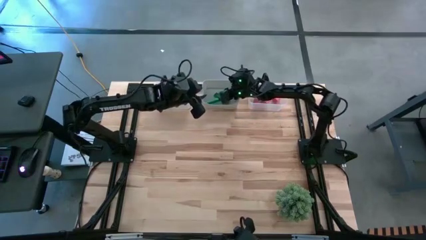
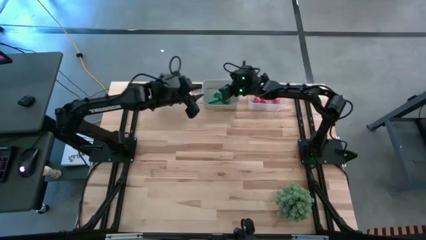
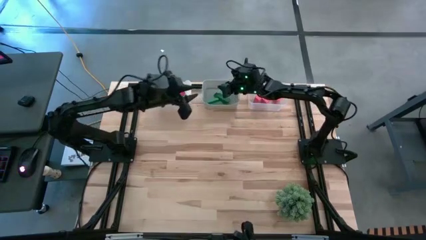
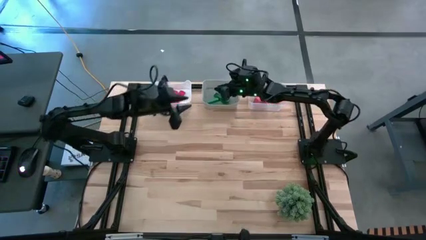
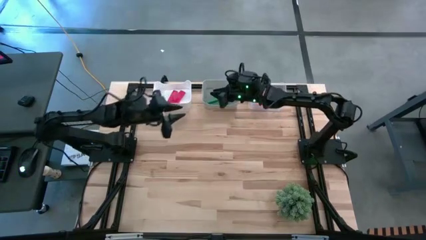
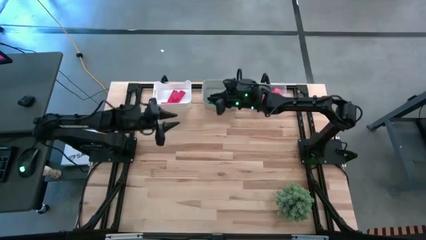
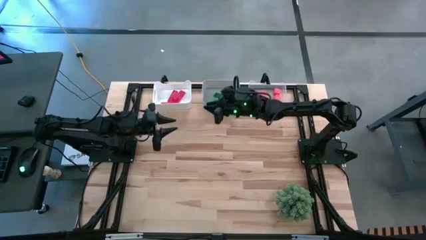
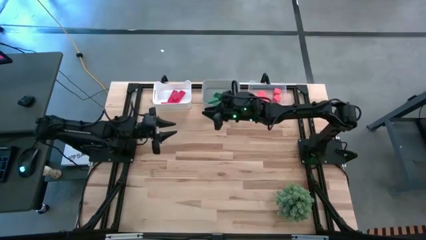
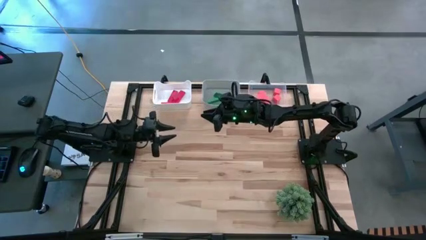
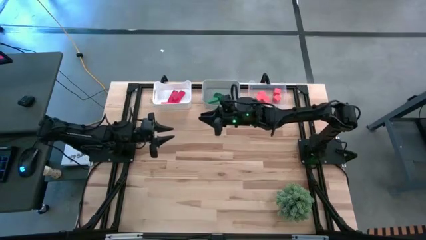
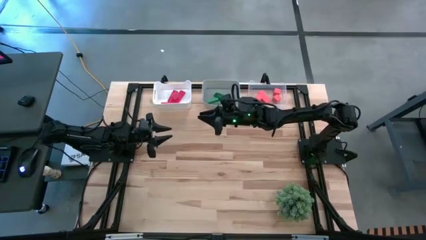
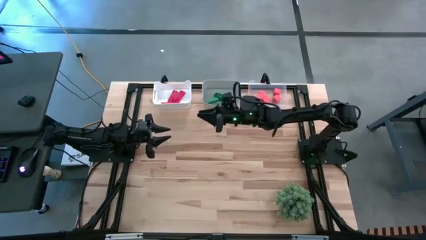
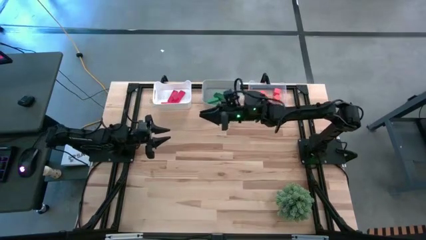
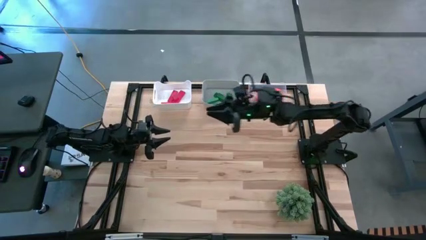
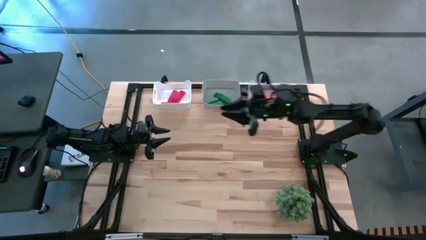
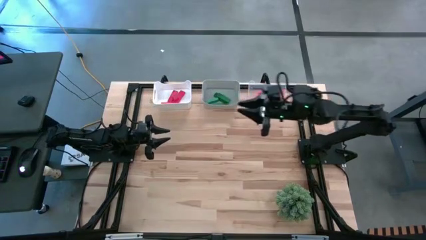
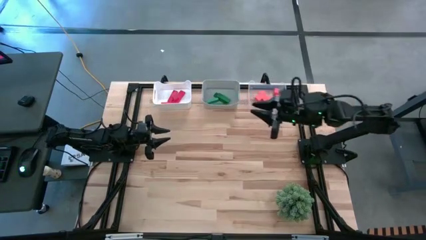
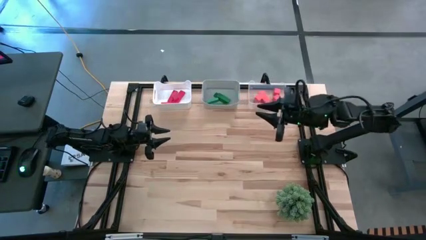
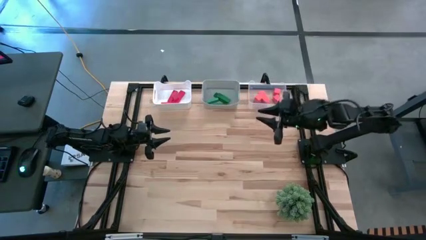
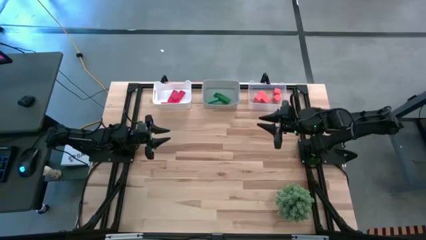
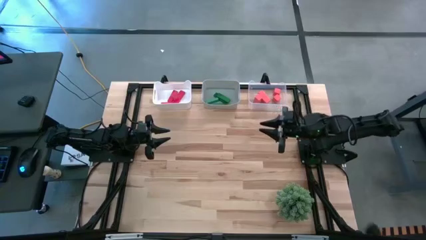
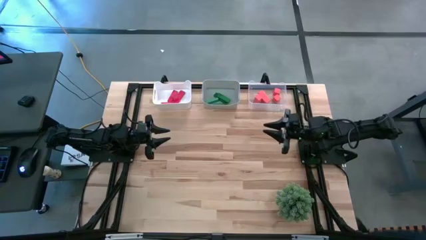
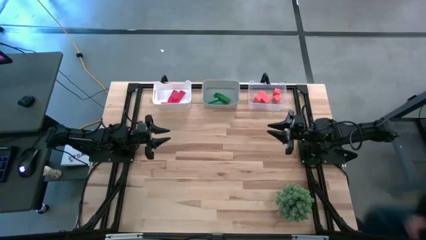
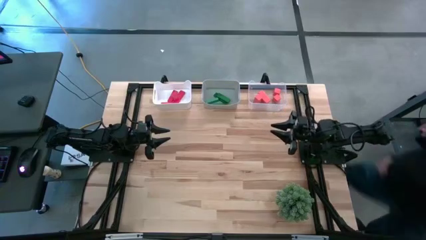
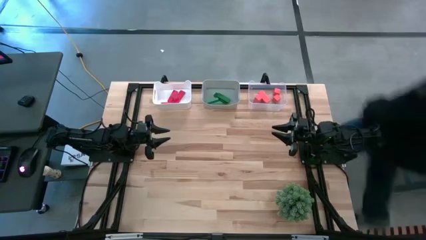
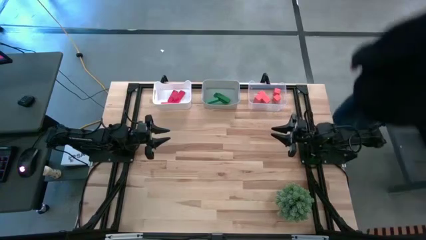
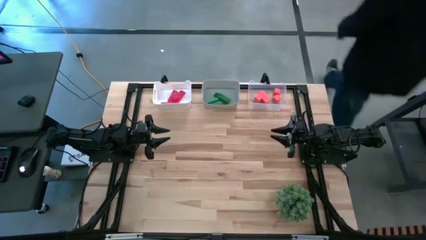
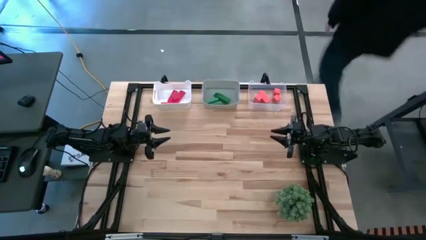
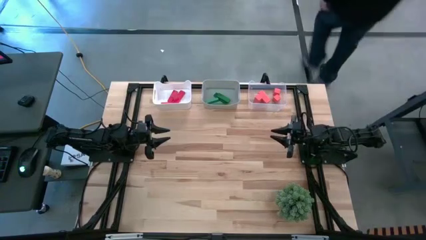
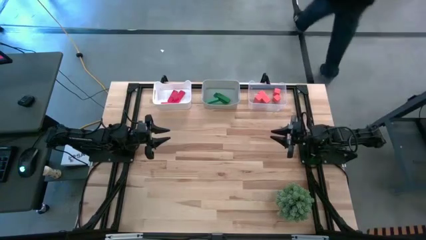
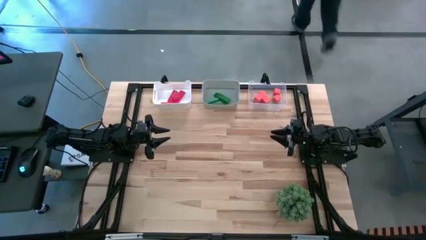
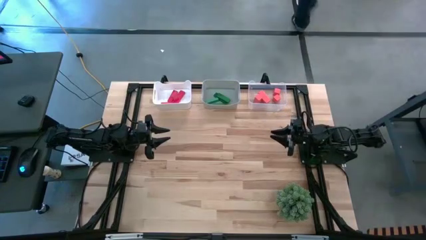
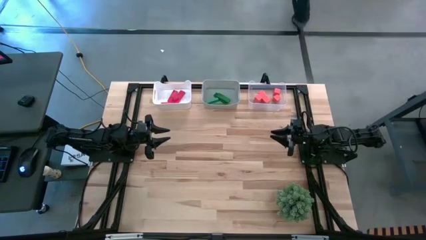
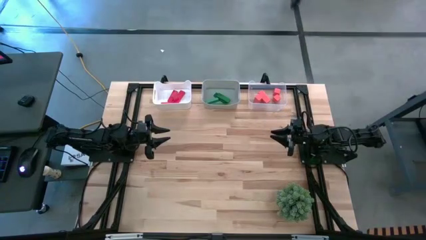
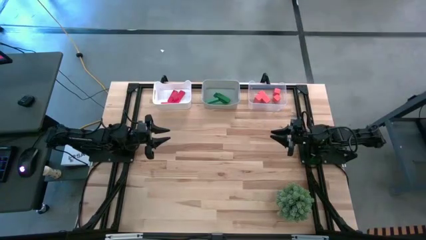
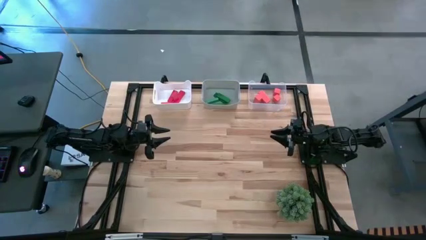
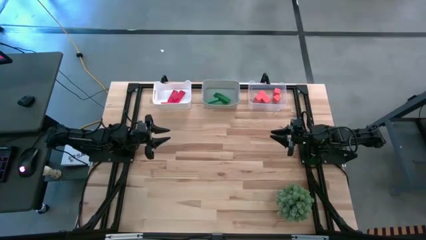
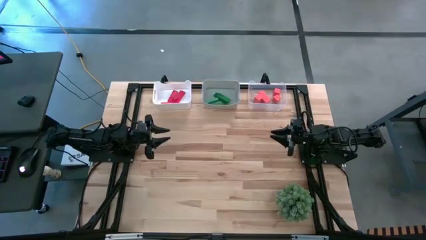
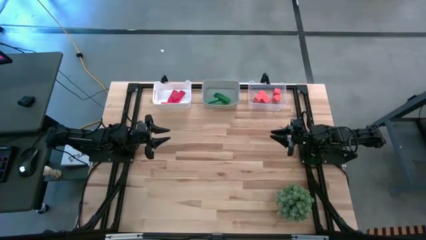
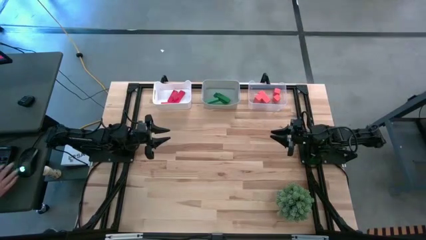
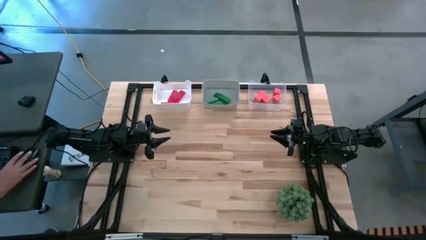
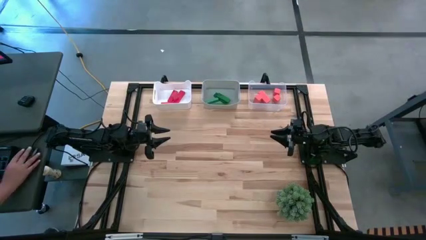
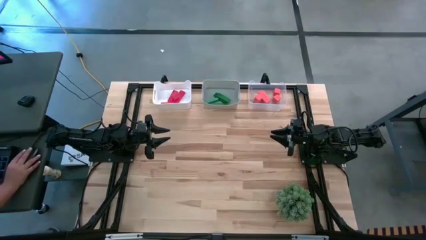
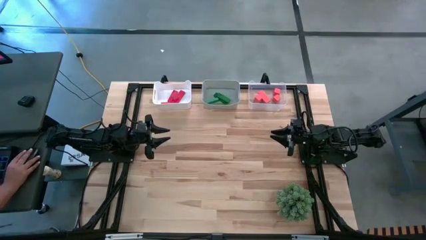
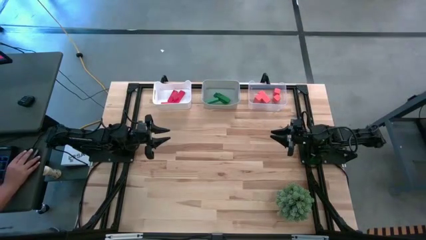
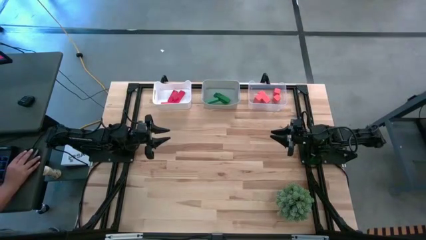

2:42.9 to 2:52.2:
Task: Sort & place blocks by color
Return to Home Position

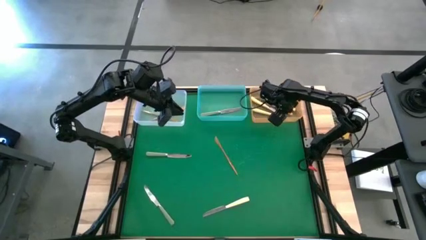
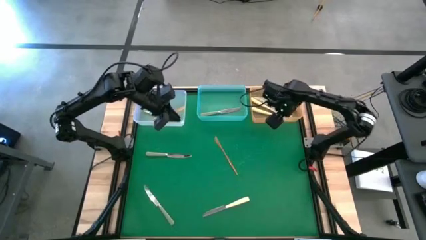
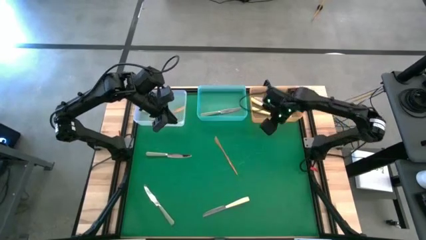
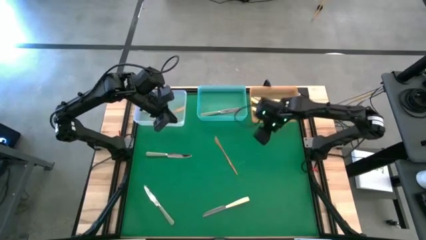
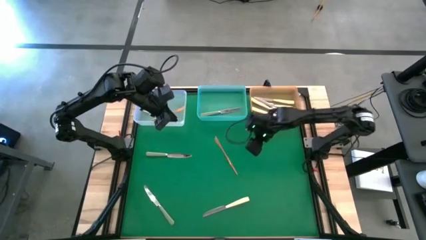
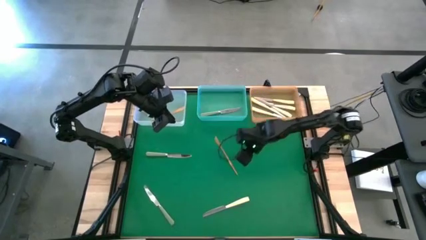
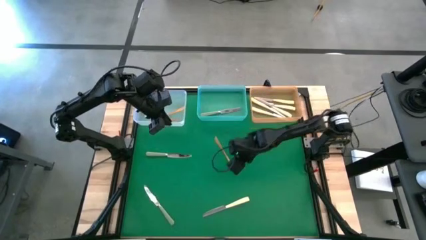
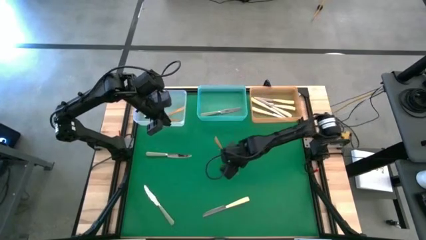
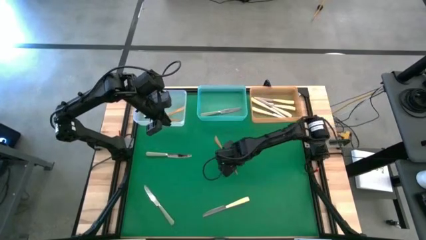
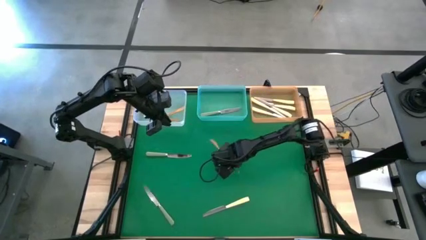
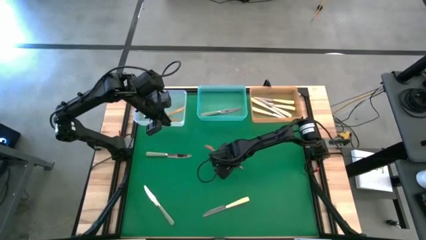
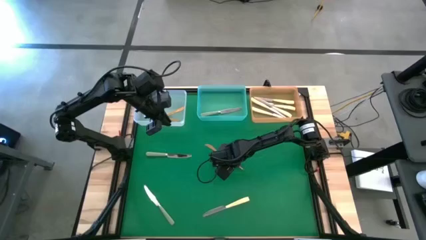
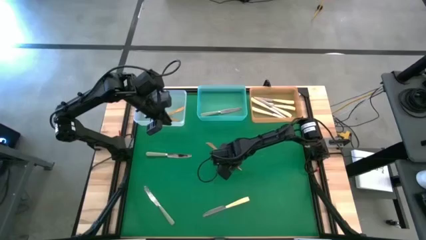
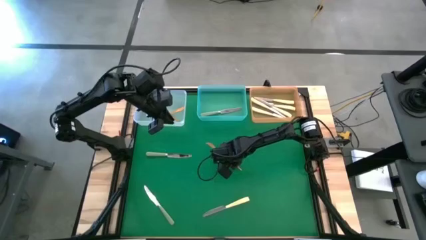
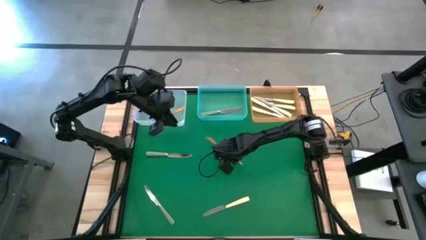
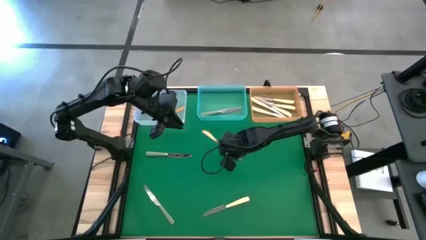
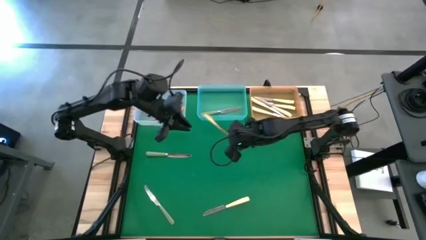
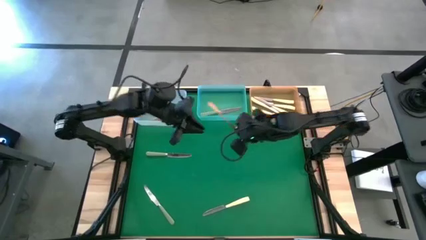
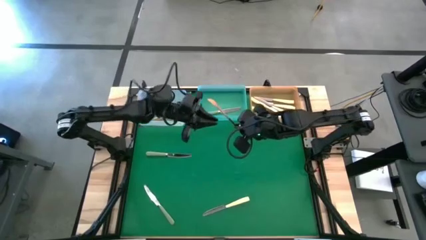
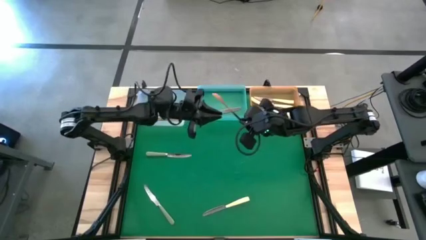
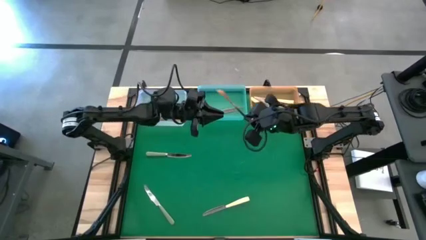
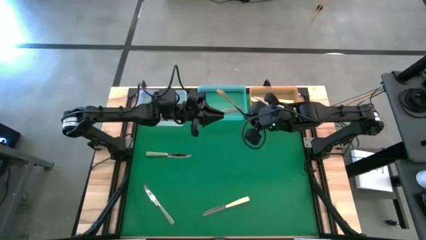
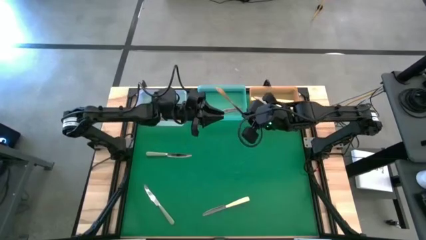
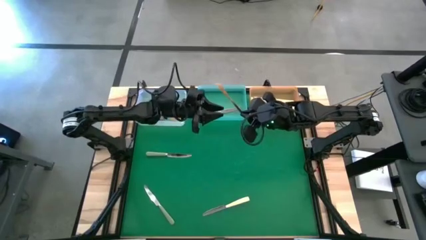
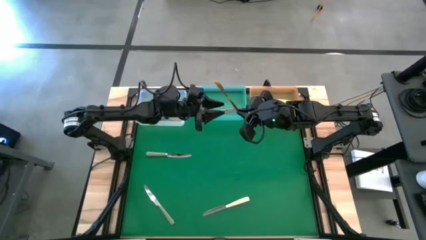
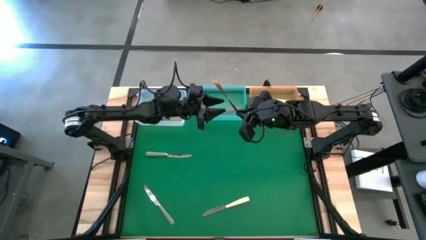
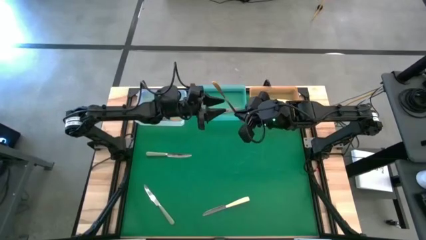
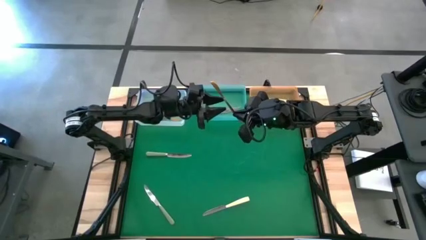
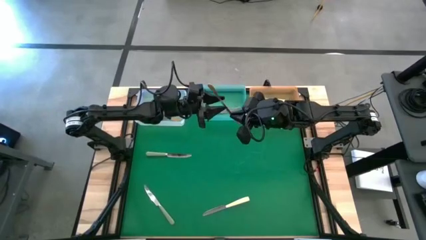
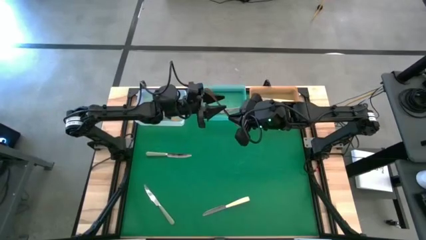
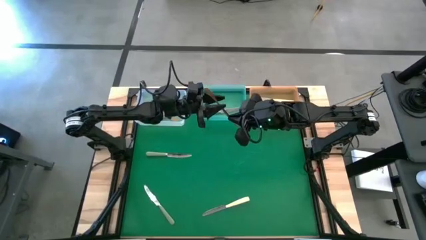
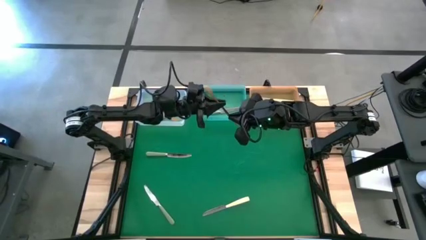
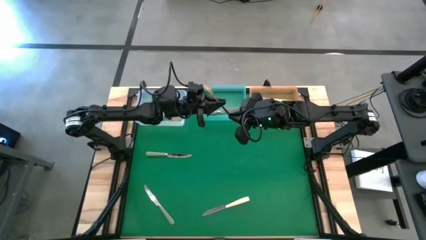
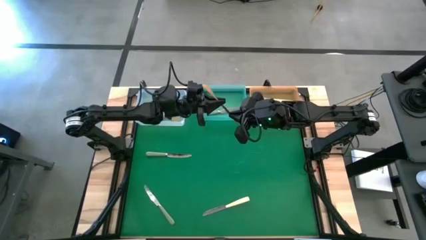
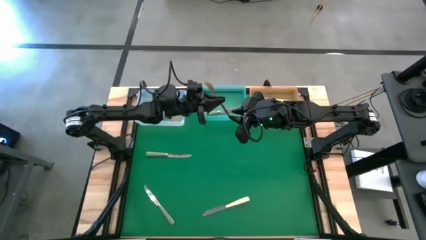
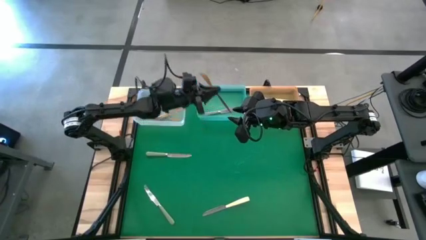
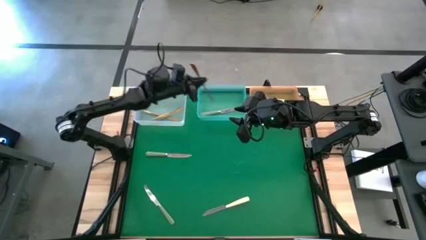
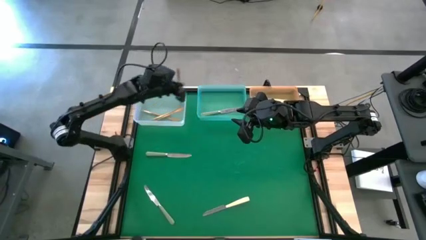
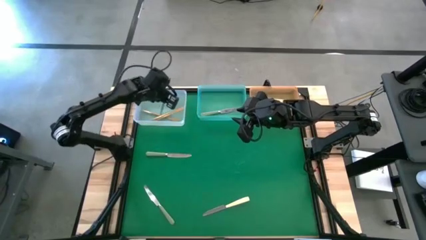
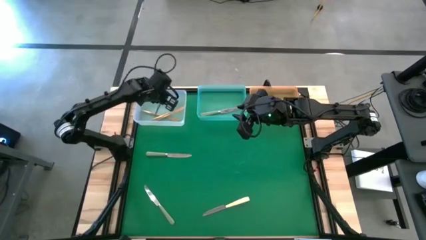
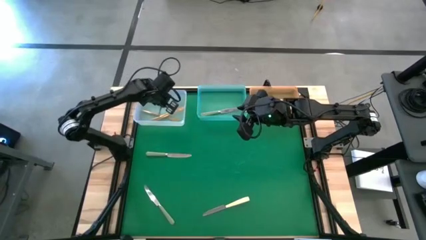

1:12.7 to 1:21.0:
Task: Sort silverware by color (type)
Put the brown table knife into the white bin
